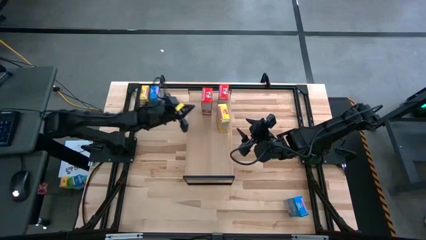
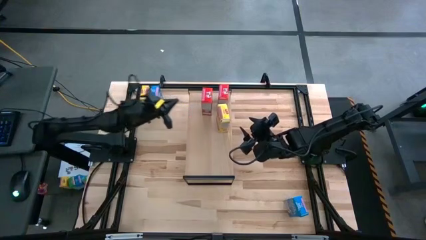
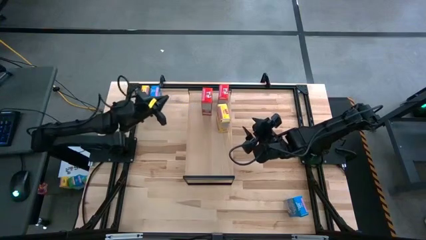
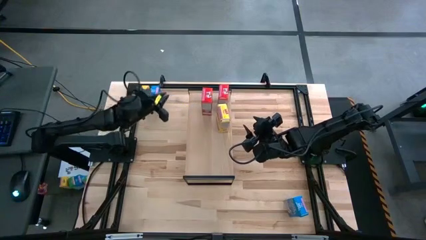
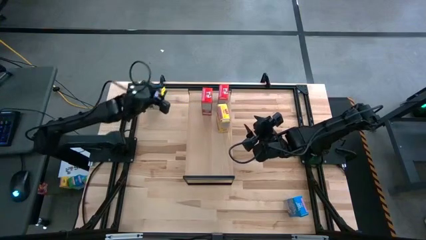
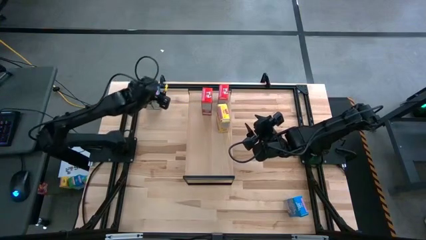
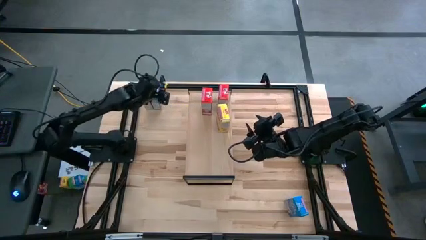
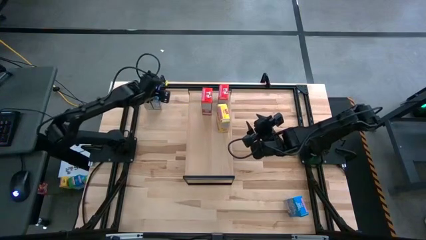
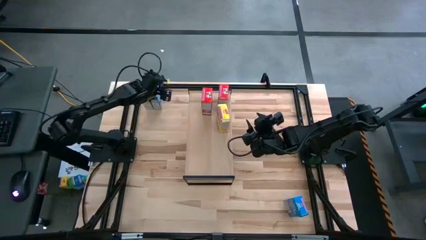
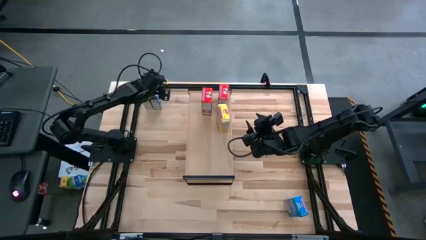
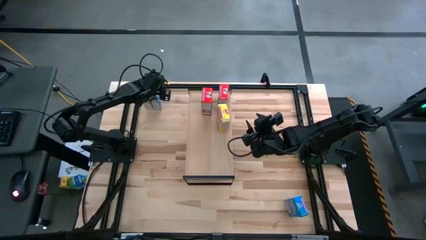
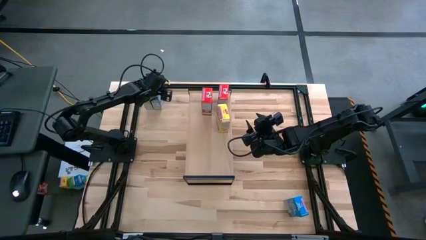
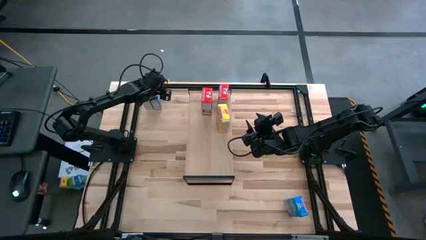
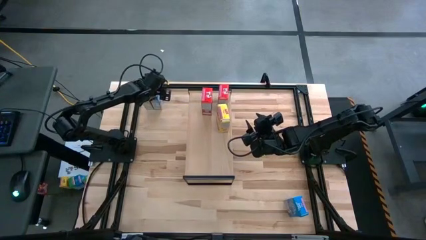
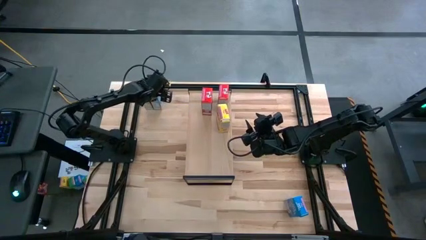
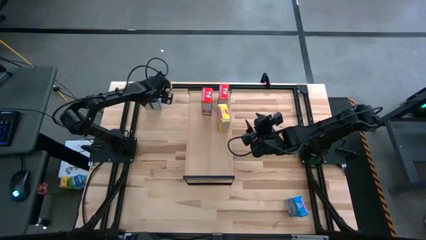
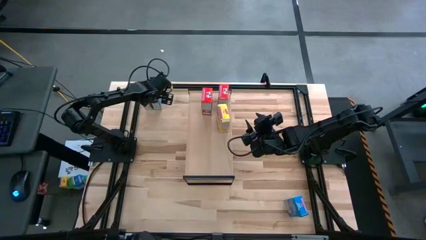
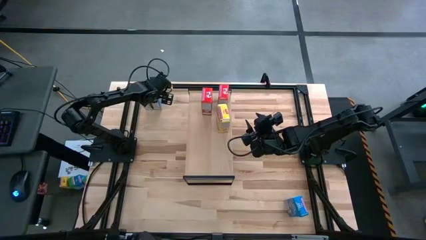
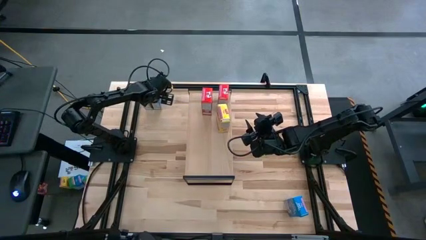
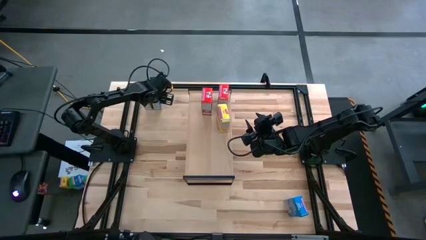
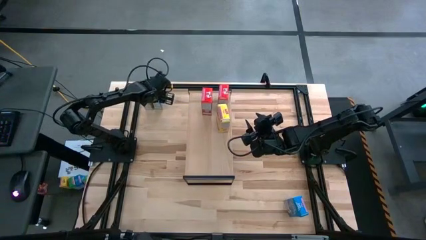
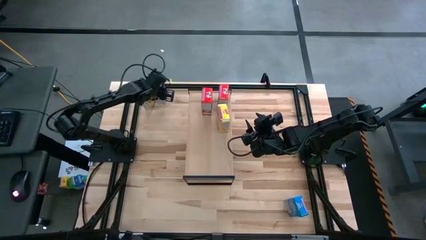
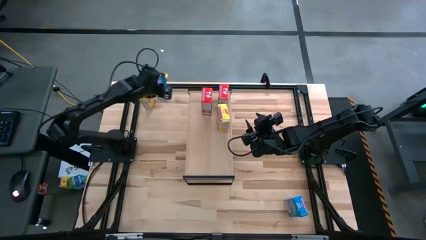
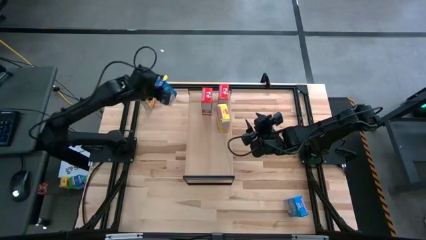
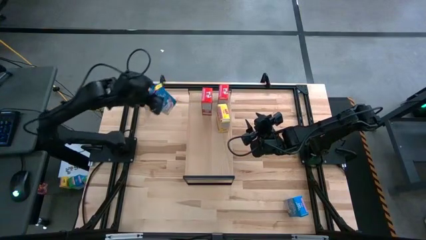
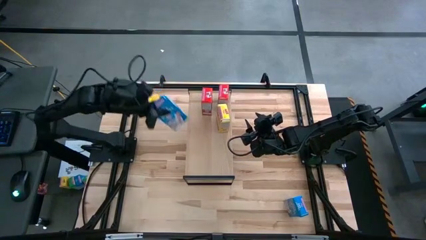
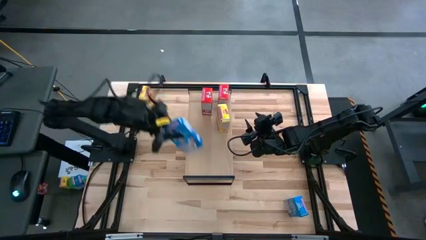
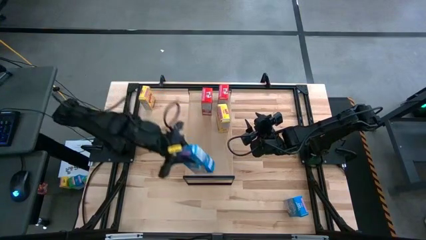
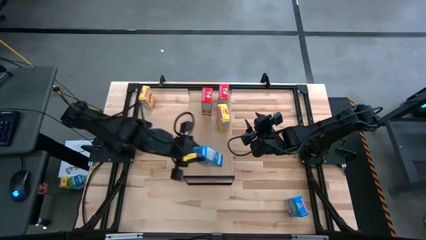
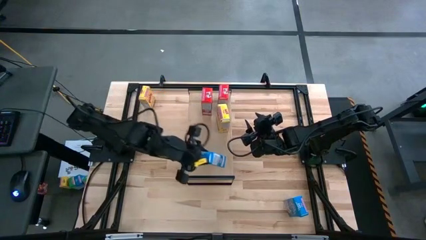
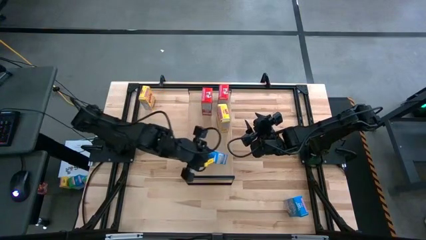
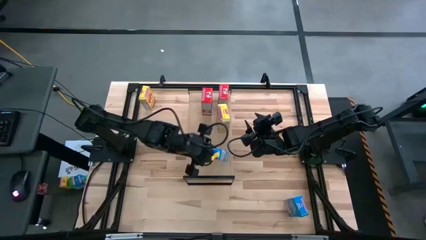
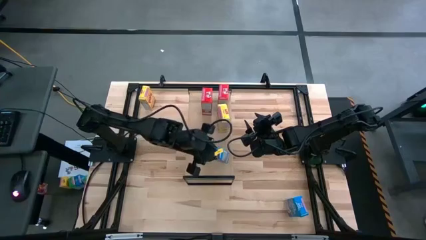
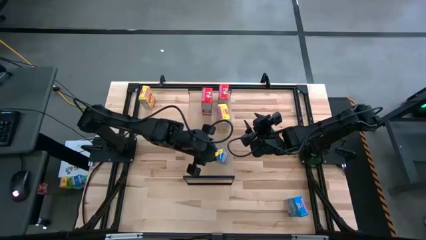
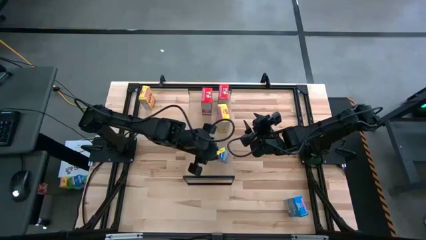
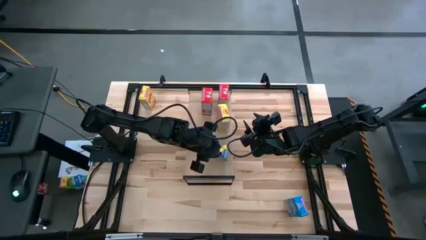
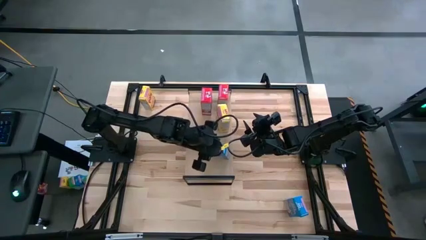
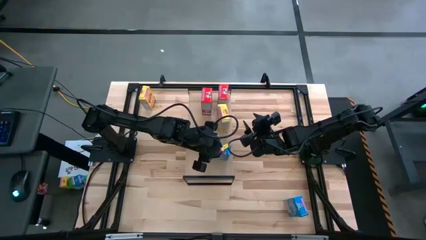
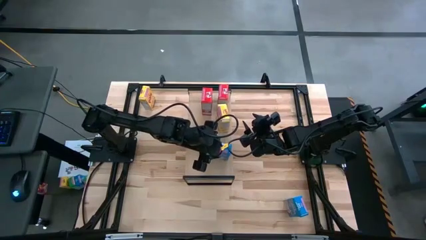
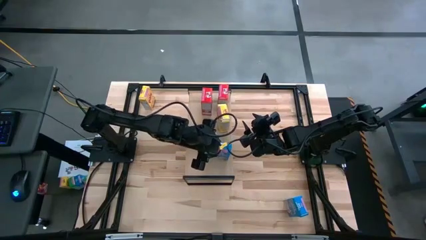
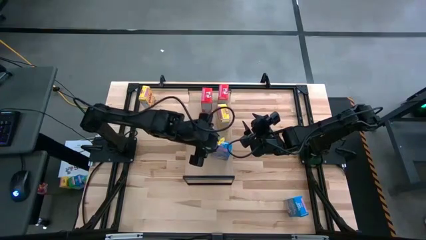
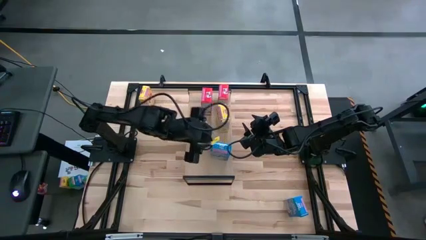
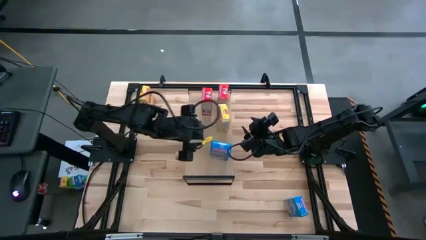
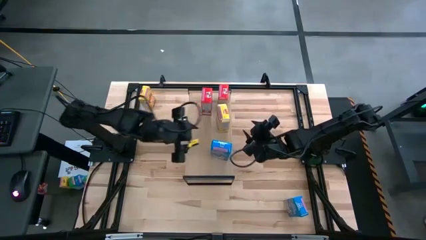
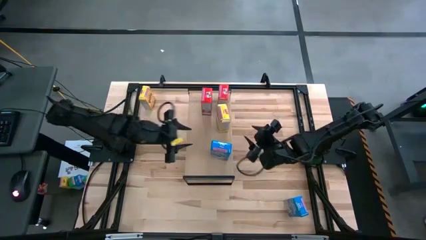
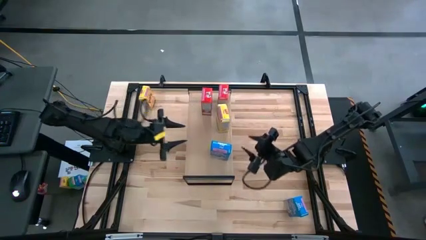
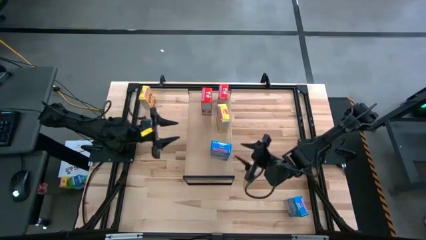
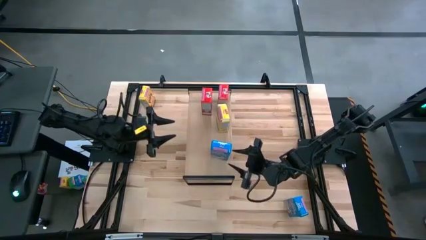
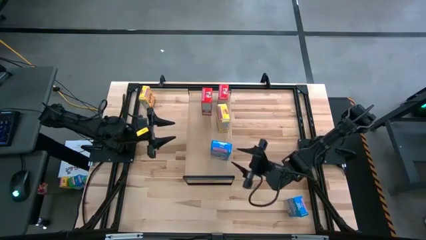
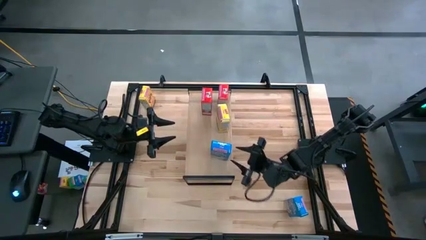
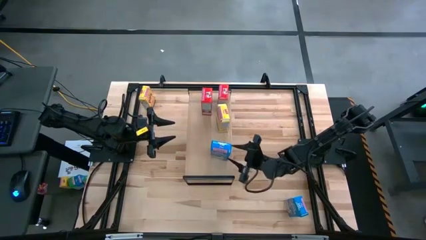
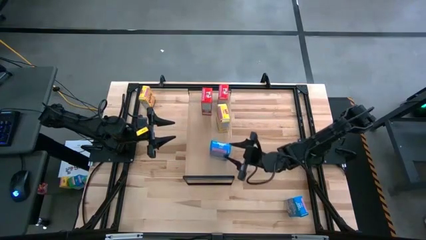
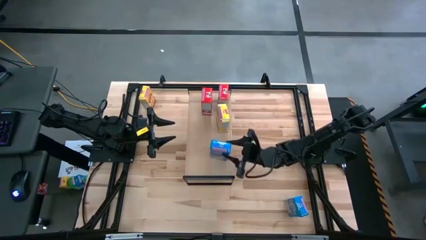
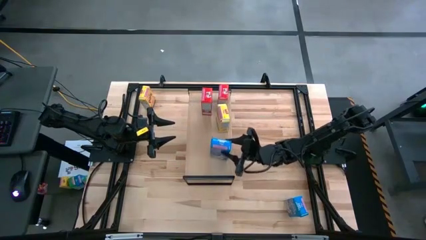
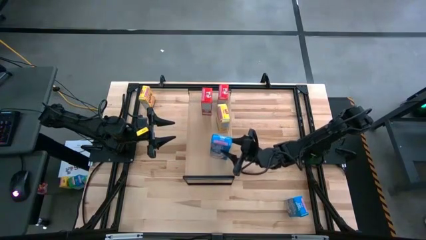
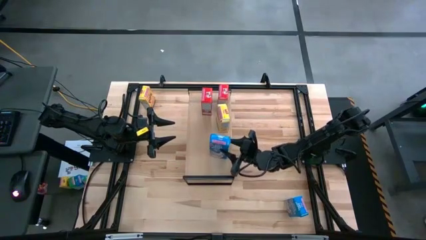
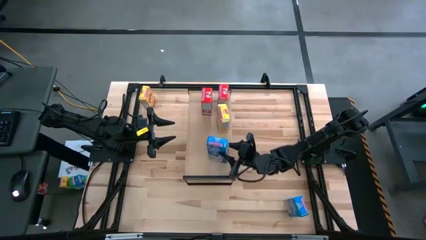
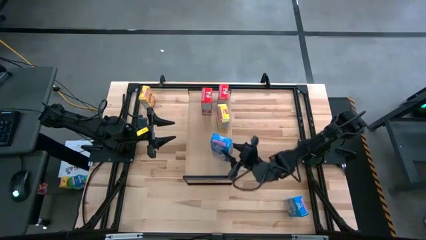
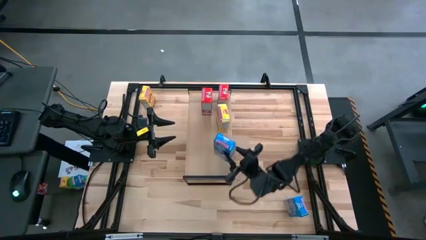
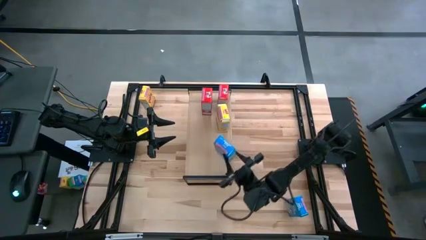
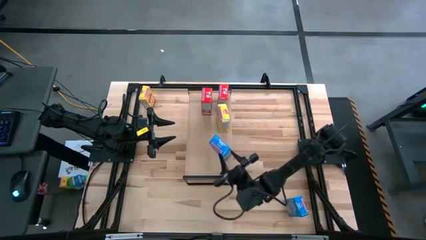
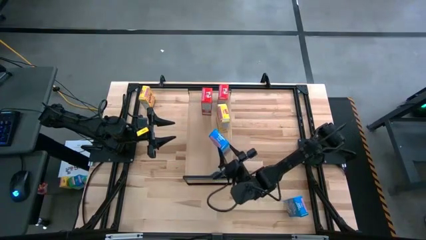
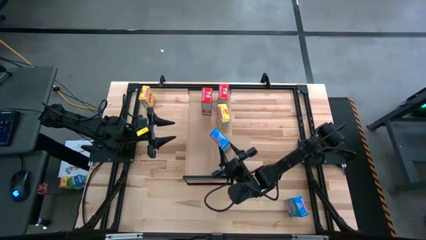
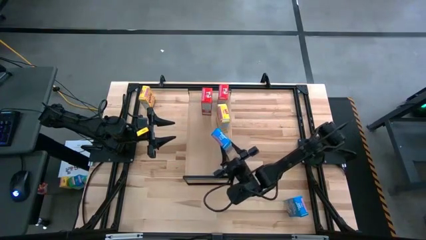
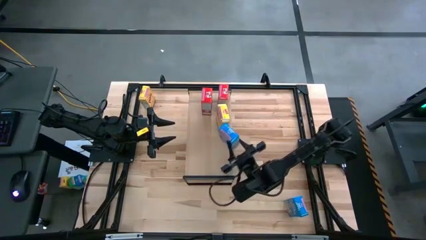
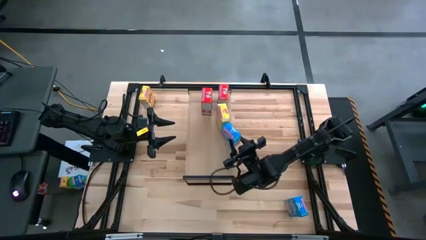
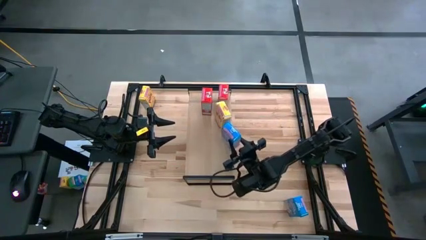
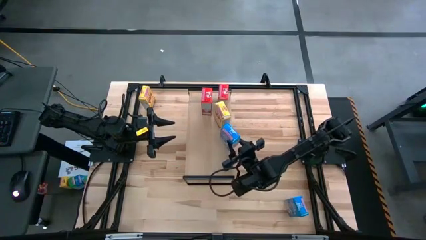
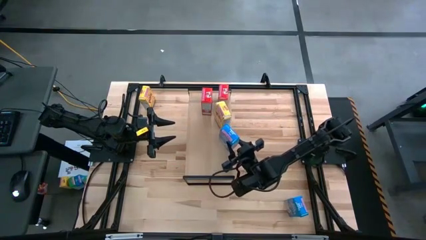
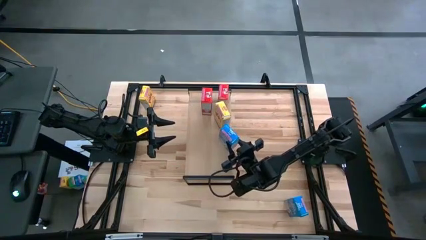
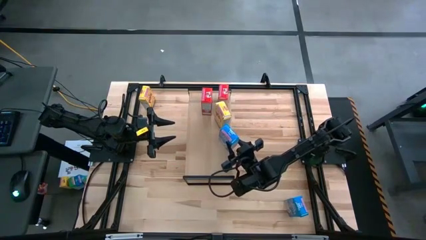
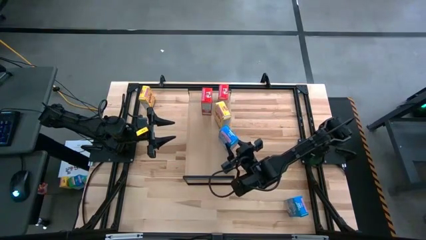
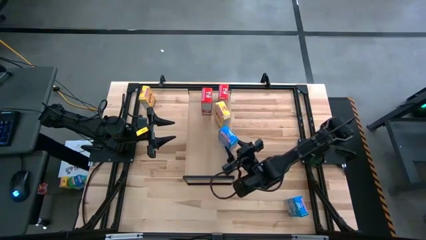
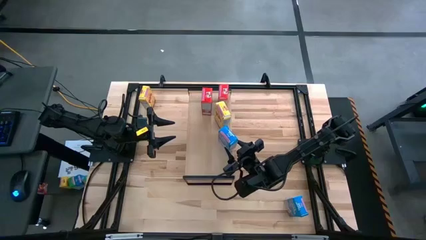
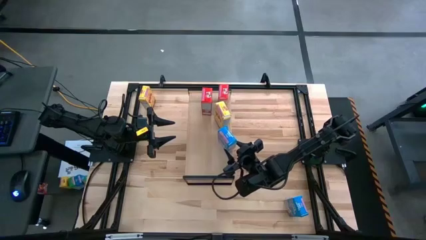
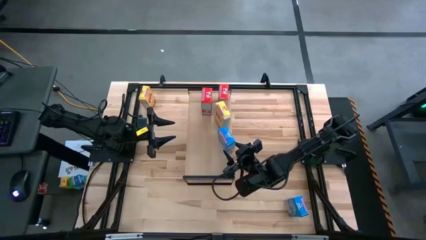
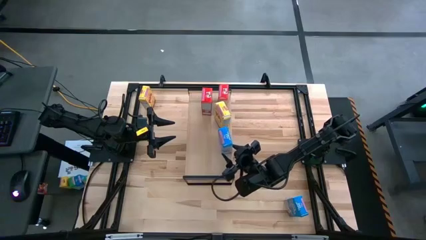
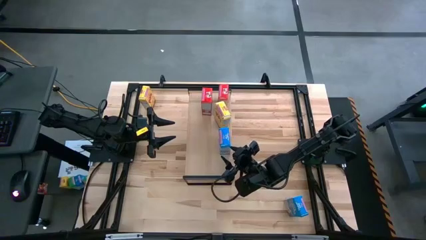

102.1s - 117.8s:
Task: Stack cereal on shelf
Put the top blue cereal box on the shelf
